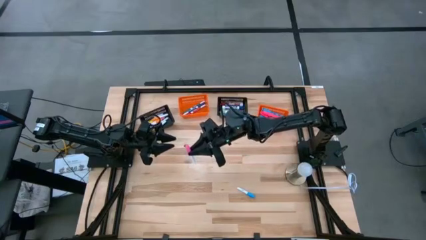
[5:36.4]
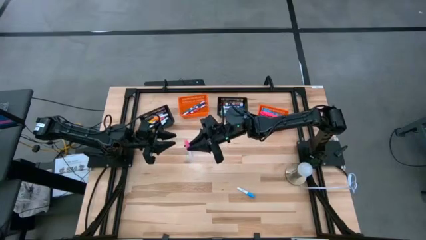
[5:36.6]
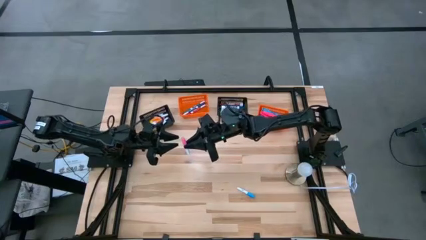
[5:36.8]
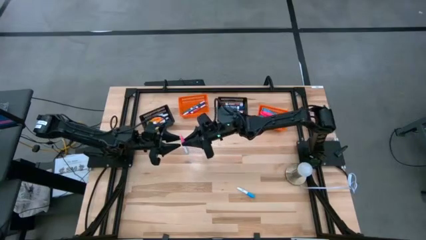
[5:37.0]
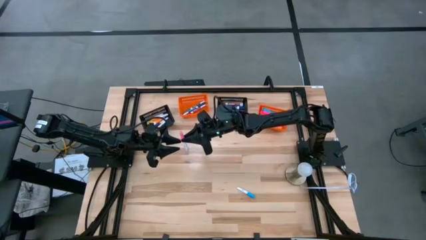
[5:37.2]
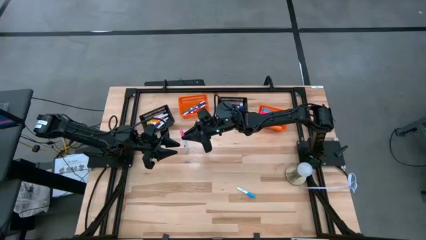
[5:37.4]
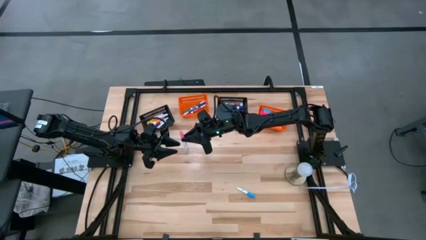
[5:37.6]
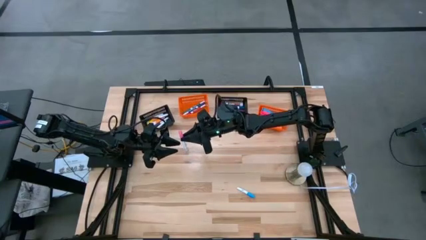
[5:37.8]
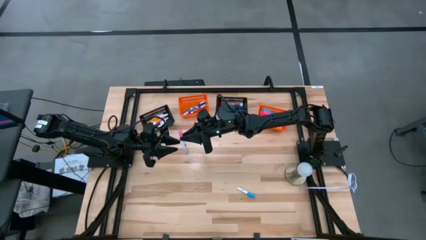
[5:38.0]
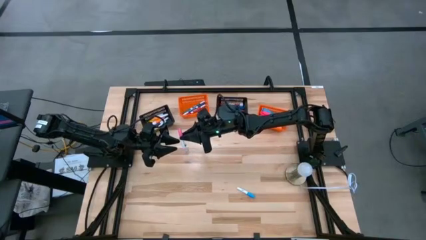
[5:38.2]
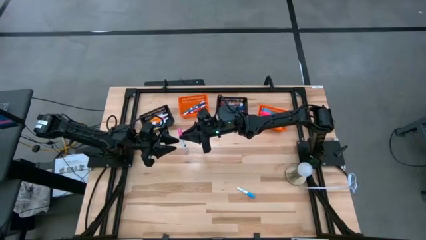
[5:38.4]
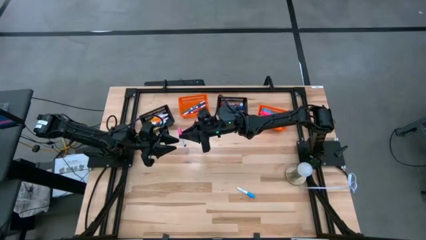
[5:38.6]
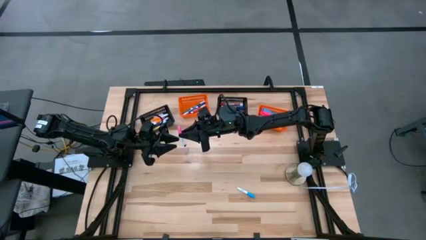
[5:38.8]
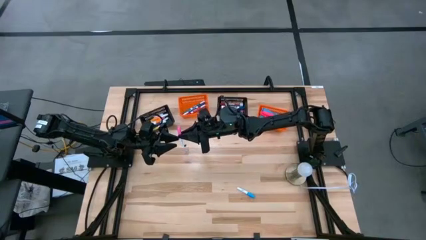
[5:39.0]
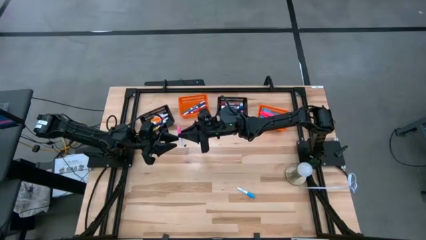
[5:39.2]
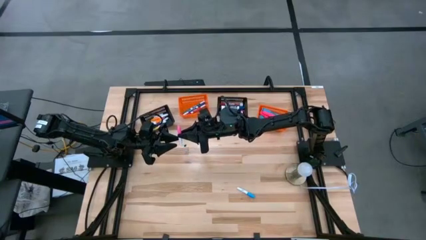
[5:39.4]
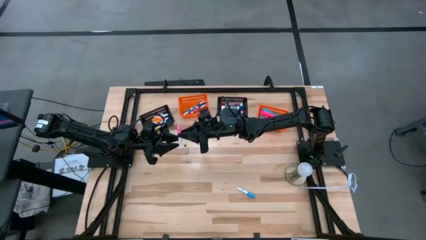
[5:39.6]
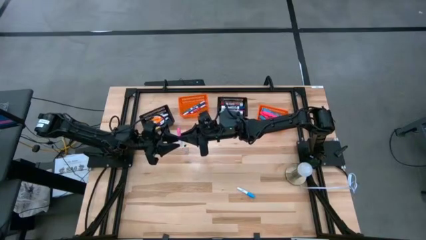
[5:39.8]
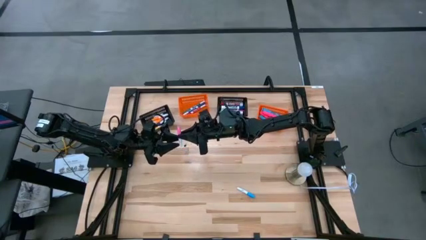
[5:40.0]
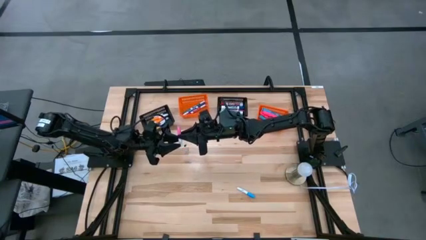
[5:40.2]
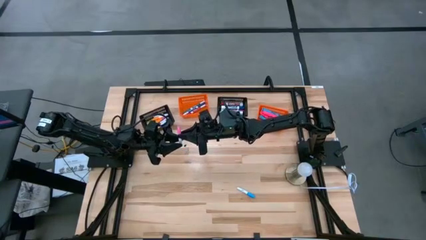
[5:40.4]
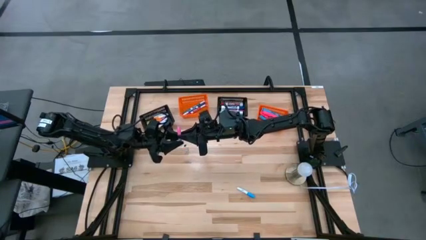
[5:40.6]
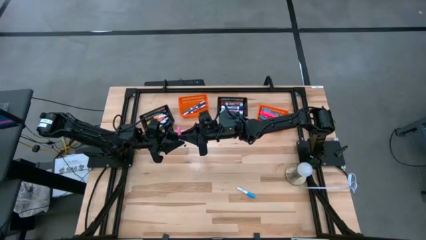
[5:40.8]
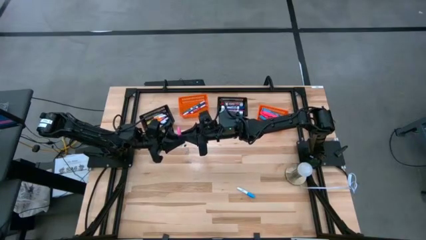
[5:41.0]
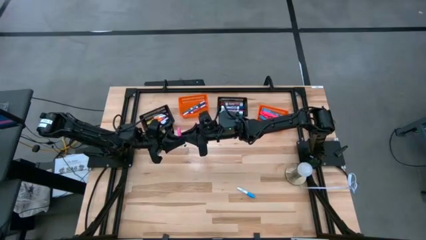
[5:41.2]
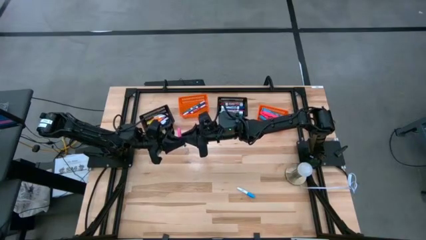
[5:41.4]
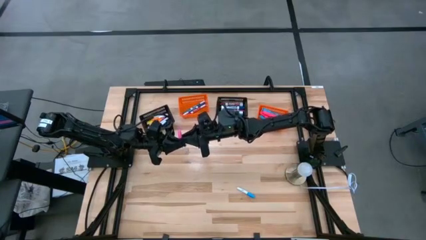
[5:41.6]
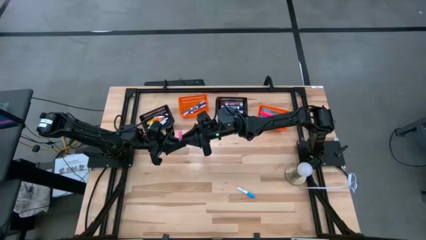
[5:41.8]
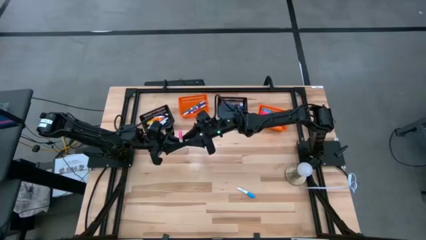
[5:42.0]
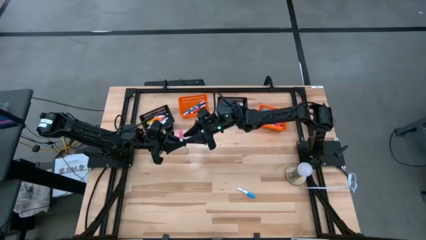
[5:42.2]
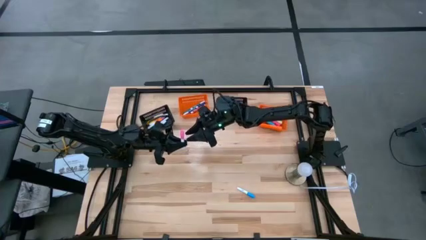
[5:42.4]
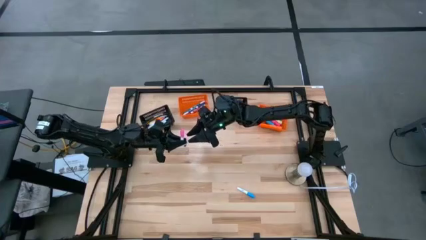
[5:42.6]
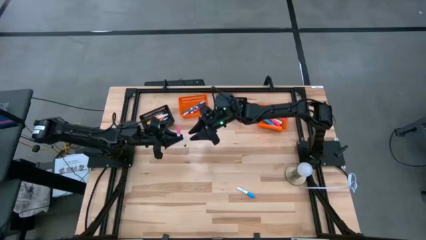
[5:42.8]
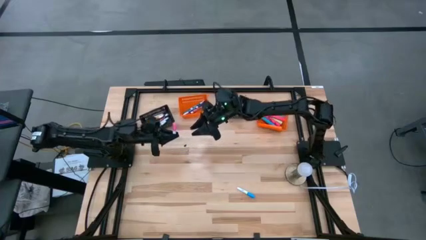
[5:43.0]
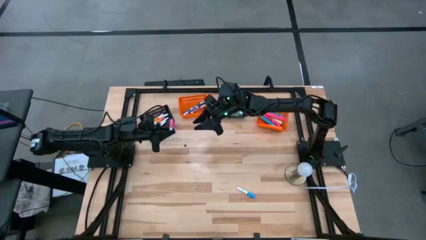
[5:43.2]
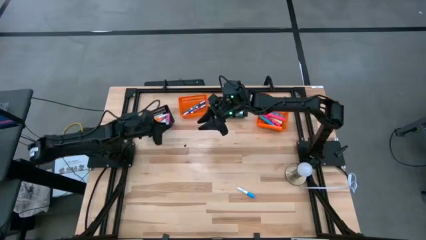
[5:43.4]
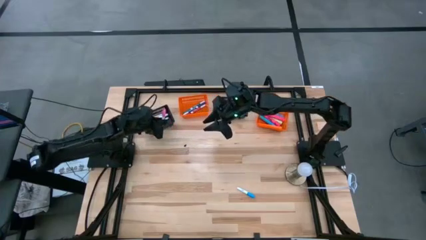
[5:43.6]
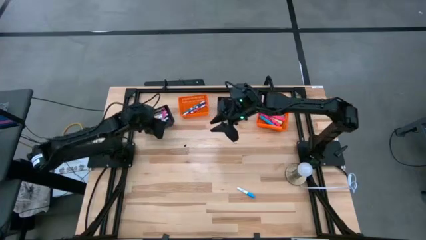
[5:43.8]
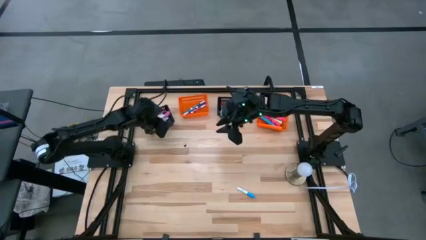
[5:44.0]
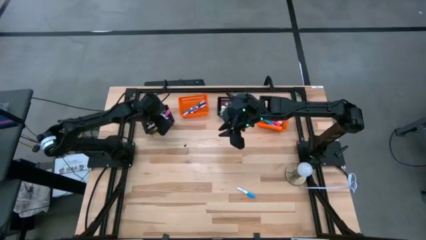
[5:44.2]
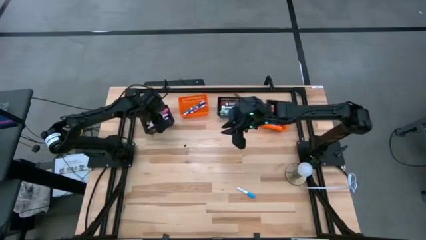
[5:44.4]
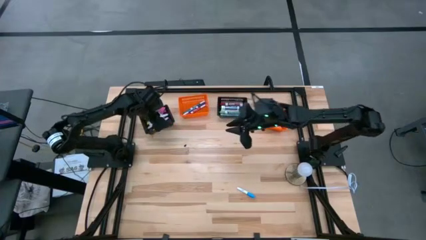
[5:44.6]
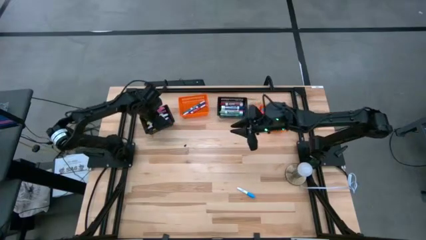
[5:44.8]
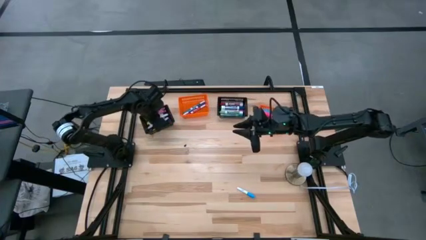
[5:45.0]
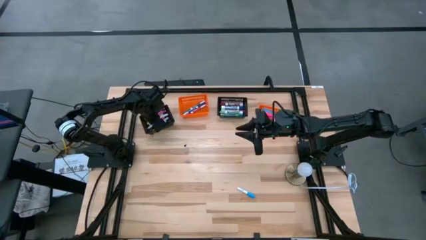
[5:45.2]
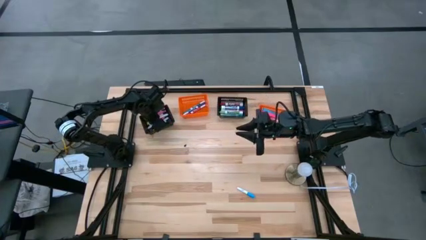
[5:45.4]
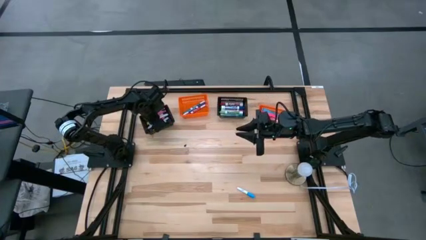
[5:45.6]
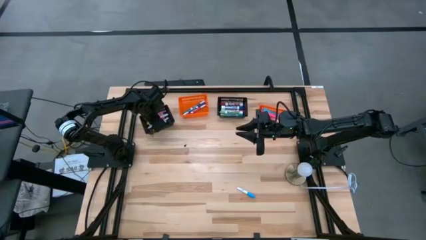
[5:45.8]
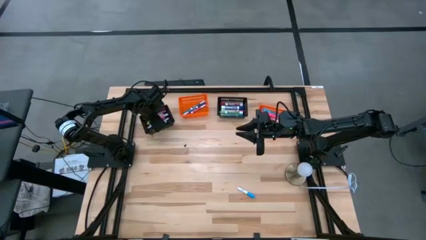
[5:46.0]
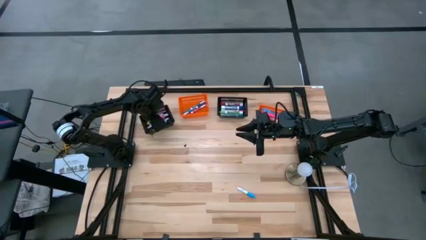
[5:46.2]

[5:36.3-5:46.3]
Task: Pick & Place Markers
Put the white pink marker into the left black bin

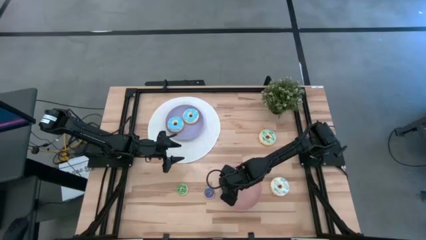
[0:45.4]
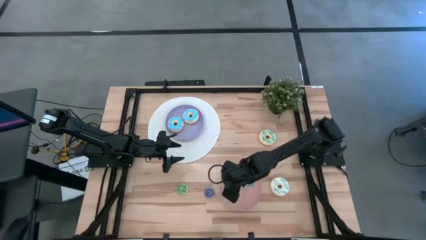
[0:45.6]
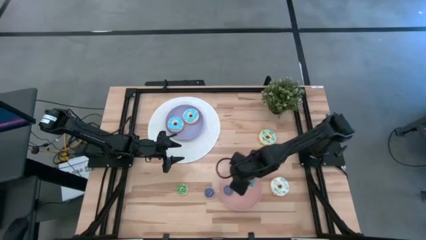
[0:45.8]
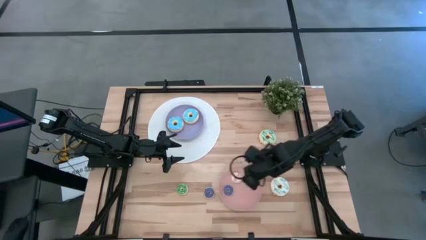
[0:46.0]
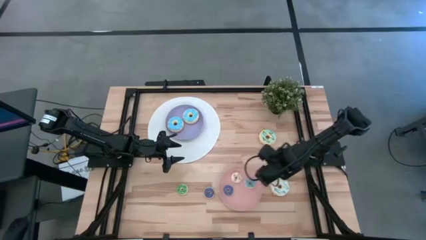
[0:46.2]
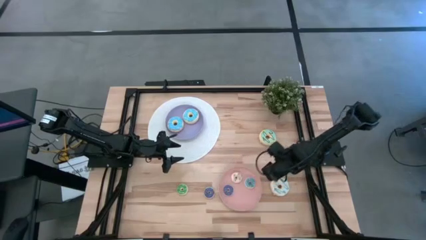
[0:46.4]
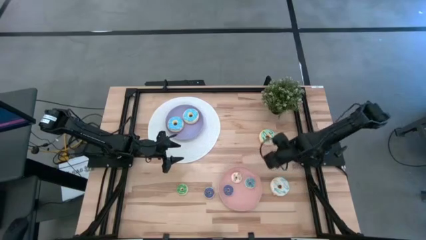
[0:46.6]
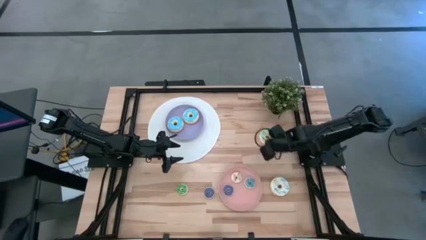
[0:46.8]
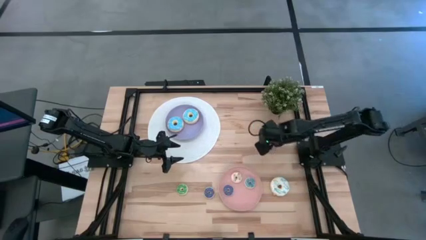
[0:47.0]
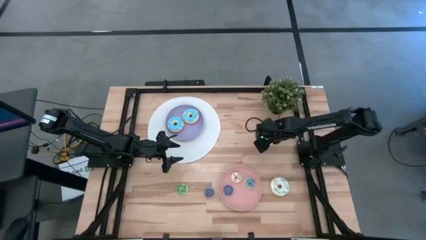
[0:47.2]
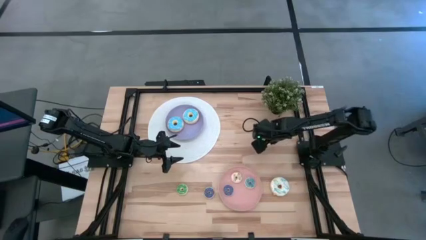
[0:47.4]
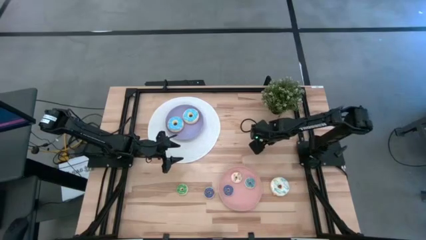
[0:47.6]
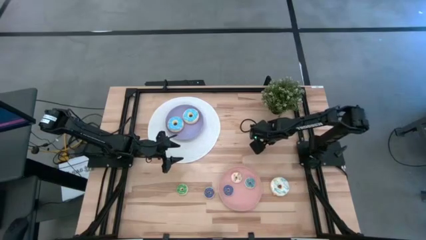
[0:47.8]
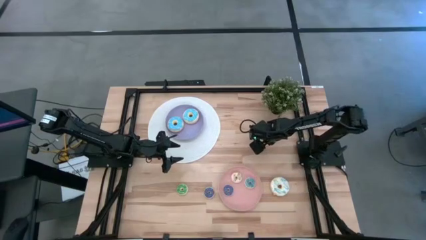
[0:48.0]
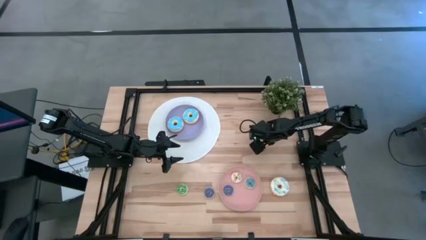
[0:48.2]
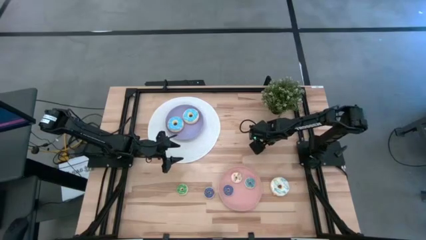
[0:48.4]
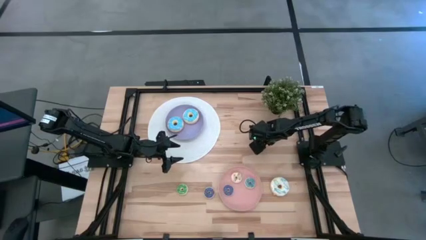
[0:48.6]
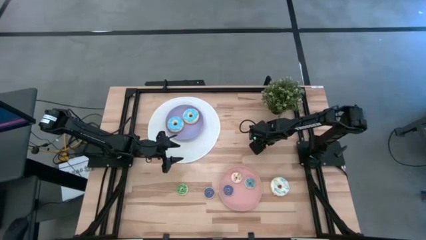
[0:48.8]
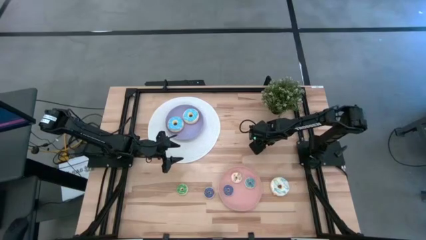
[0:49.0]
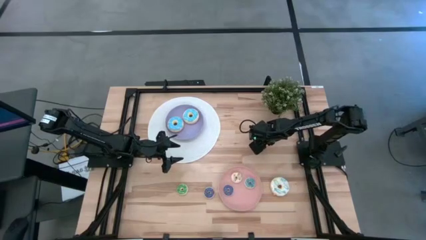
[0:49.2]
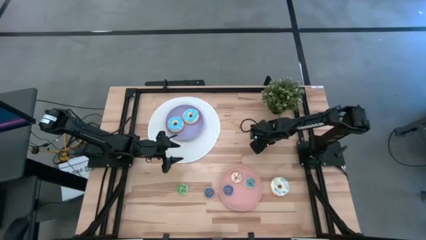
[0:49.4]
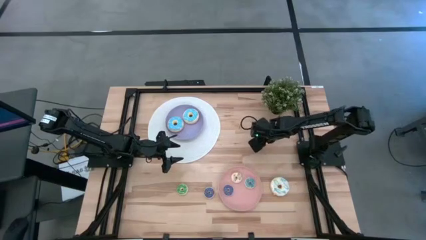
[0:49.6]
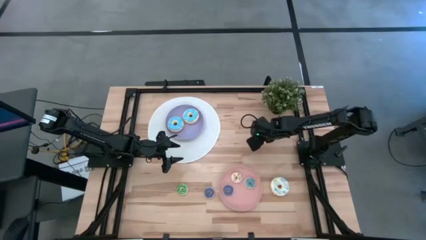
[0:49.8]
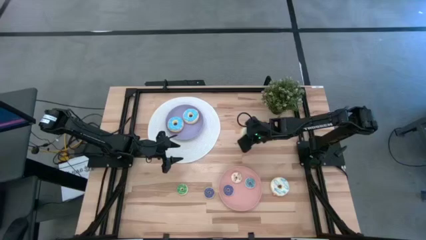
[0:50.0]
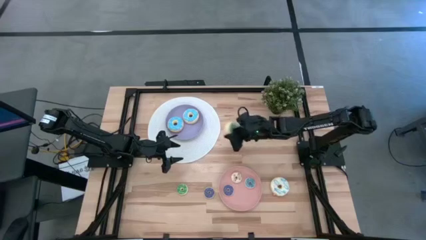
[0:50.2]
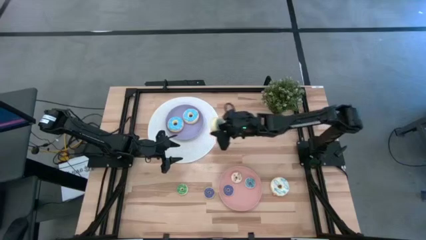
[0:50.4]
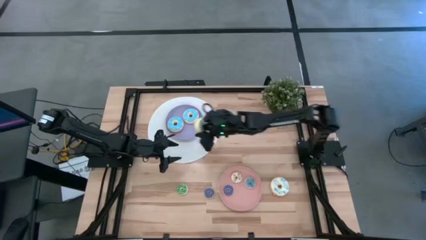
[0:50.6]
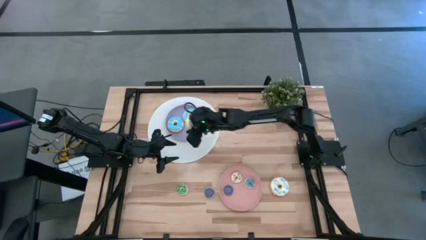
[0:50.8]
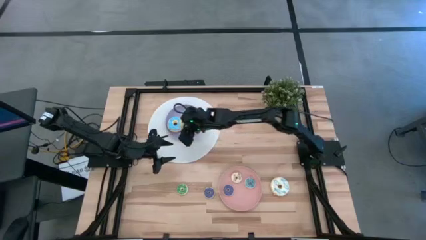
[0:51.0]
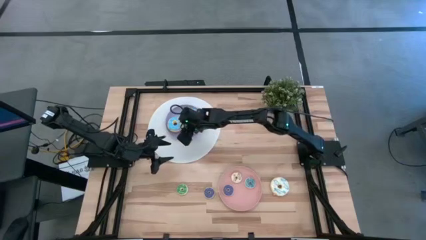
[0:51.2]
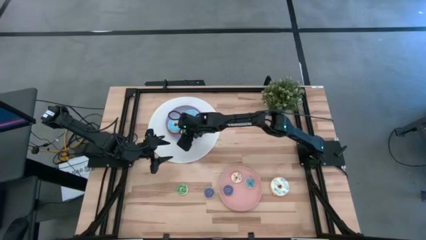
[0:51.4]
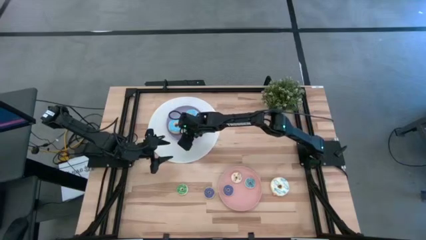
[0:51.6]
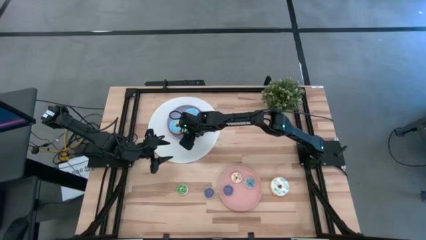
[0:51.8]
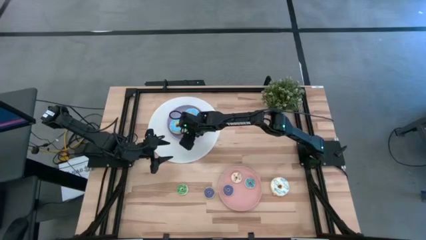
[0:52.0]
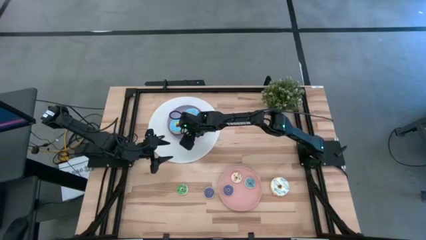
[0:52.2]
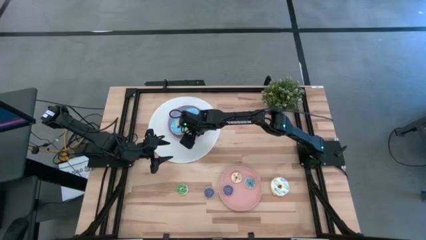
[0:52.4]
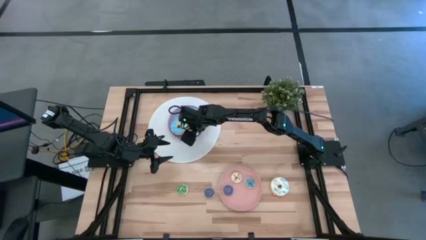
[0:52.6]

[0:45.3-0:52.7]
Task: Pick & Place donuts
Put the big light green donut on the purple plate
